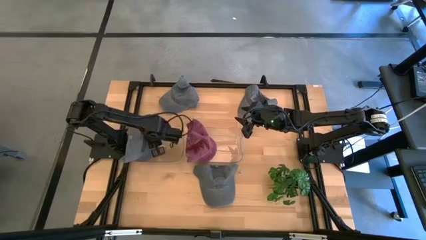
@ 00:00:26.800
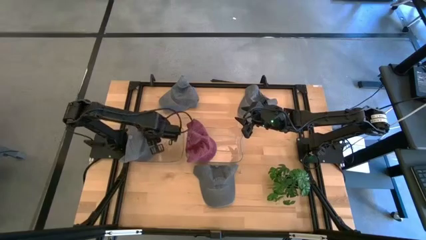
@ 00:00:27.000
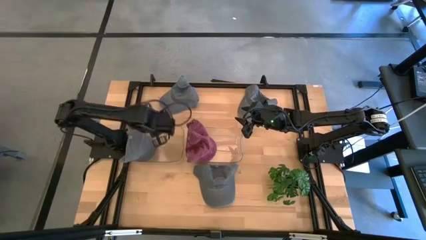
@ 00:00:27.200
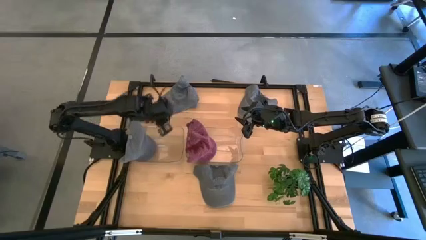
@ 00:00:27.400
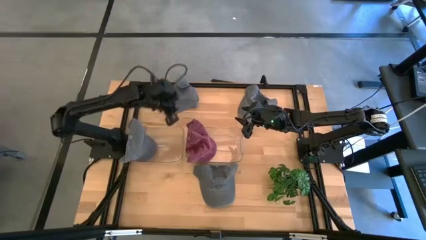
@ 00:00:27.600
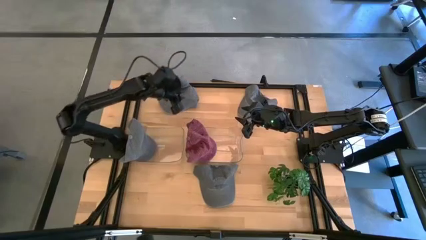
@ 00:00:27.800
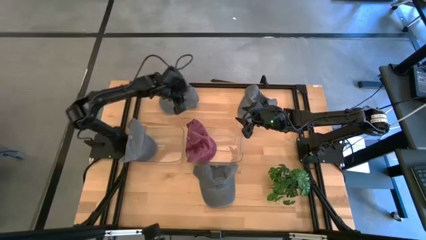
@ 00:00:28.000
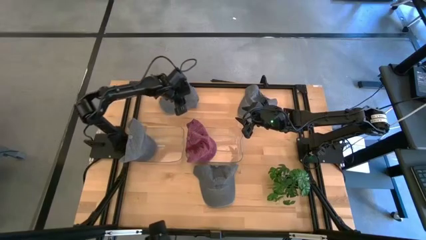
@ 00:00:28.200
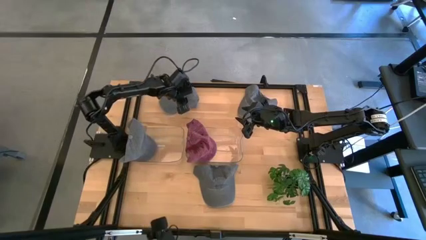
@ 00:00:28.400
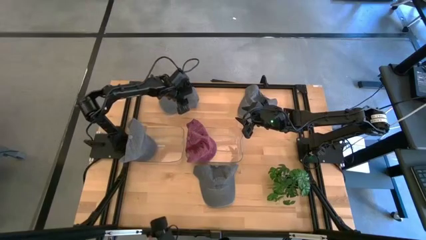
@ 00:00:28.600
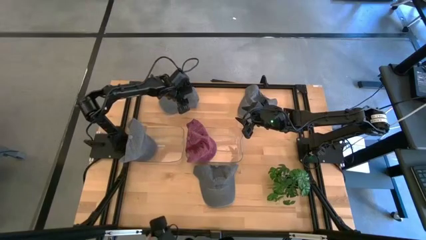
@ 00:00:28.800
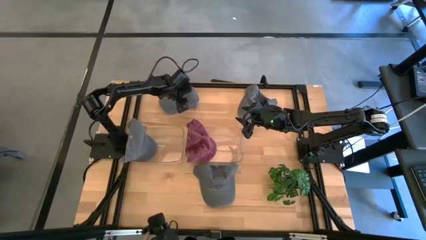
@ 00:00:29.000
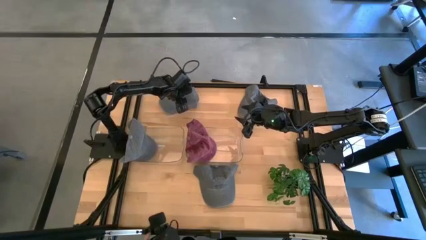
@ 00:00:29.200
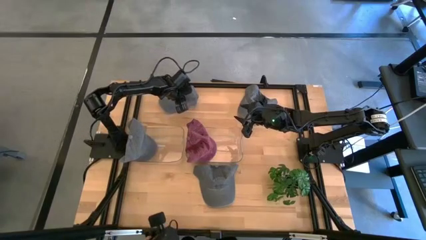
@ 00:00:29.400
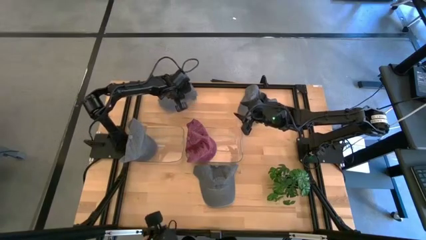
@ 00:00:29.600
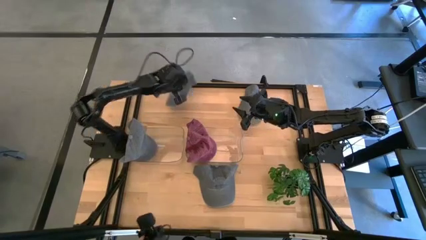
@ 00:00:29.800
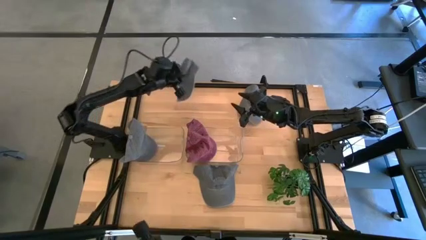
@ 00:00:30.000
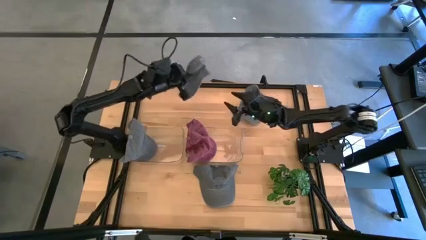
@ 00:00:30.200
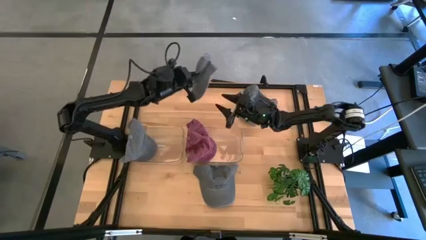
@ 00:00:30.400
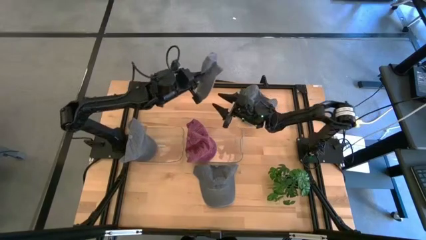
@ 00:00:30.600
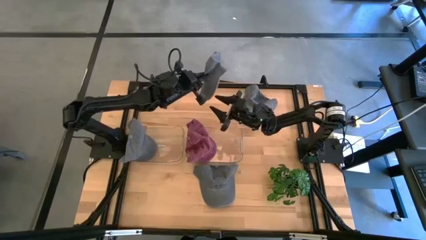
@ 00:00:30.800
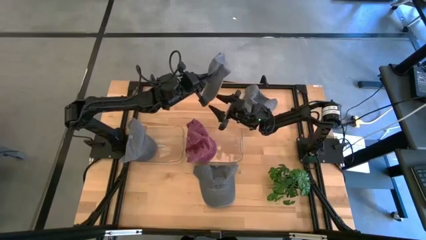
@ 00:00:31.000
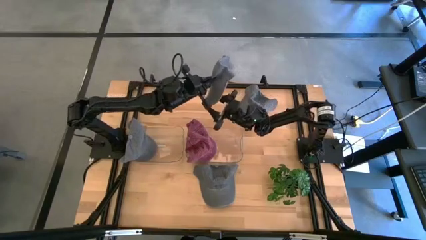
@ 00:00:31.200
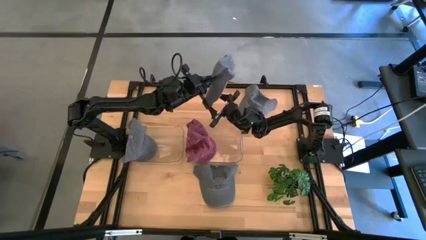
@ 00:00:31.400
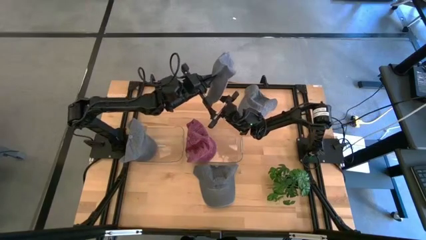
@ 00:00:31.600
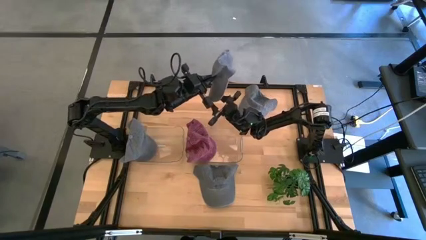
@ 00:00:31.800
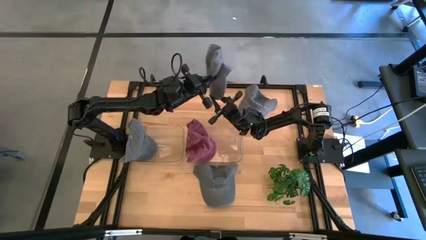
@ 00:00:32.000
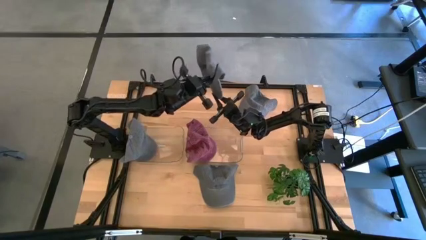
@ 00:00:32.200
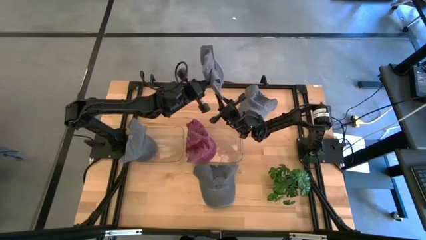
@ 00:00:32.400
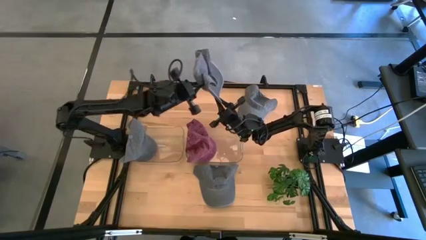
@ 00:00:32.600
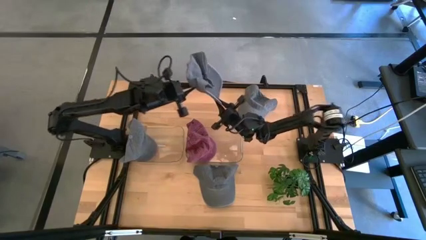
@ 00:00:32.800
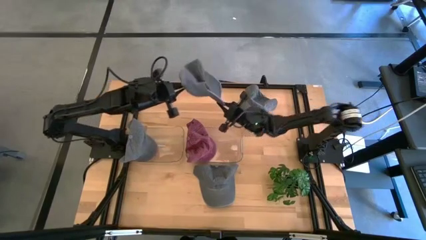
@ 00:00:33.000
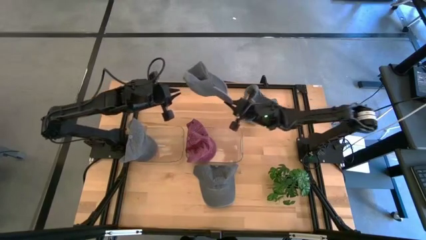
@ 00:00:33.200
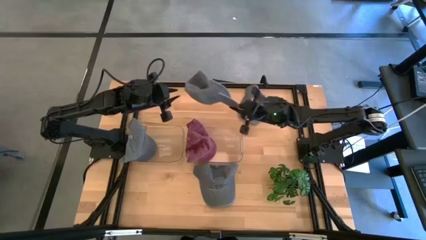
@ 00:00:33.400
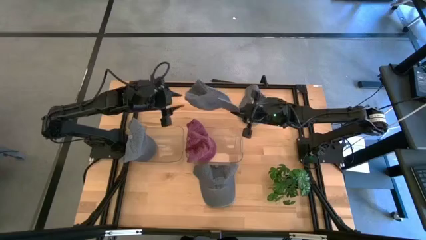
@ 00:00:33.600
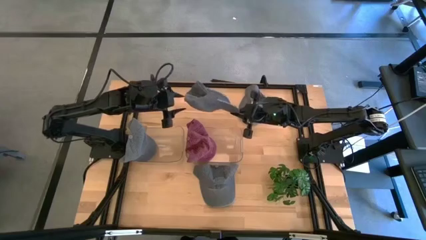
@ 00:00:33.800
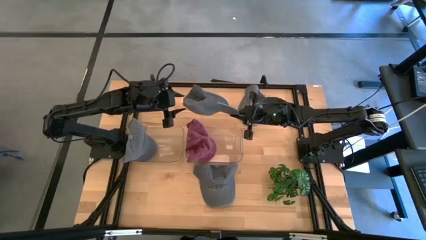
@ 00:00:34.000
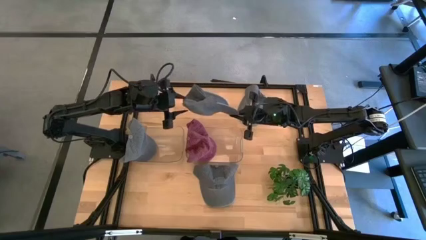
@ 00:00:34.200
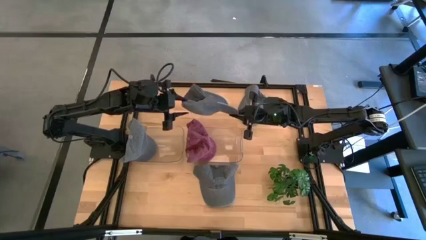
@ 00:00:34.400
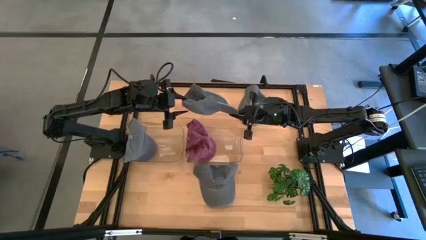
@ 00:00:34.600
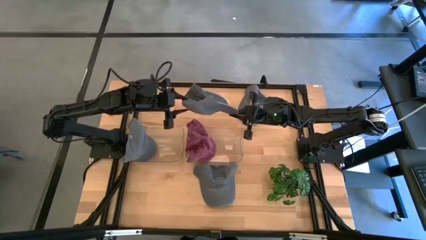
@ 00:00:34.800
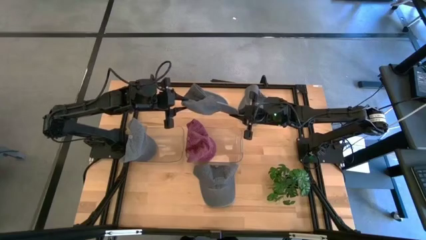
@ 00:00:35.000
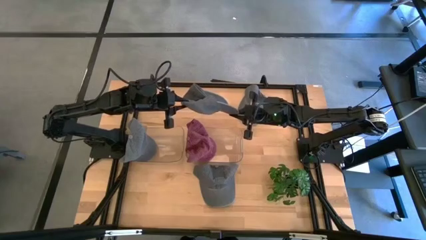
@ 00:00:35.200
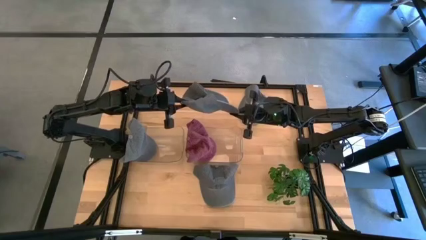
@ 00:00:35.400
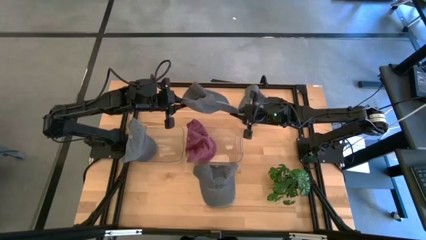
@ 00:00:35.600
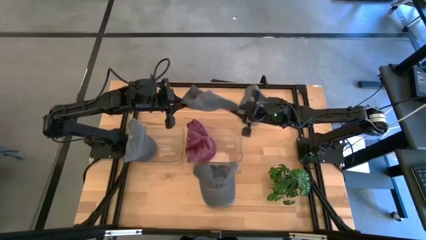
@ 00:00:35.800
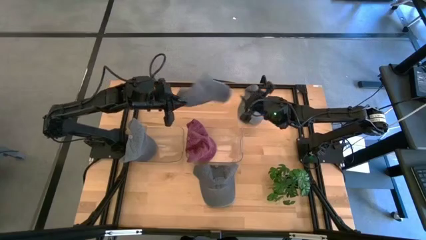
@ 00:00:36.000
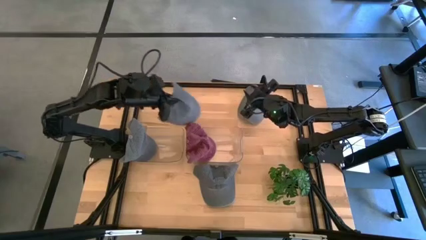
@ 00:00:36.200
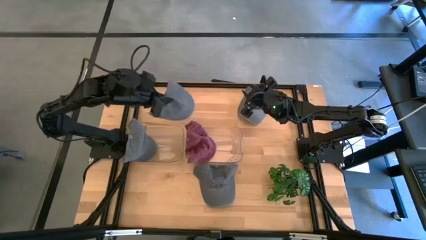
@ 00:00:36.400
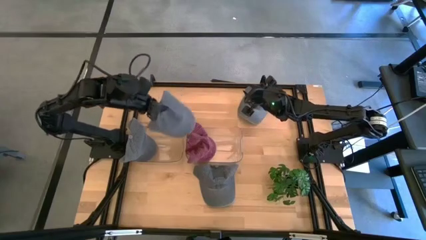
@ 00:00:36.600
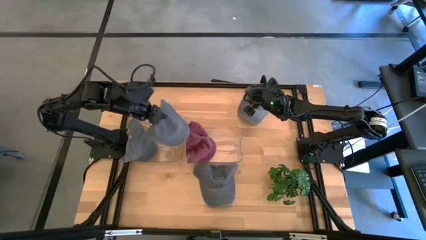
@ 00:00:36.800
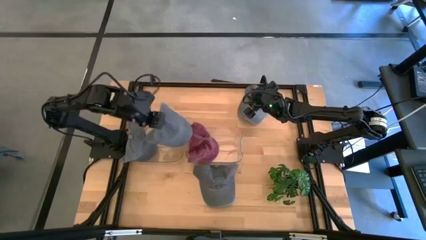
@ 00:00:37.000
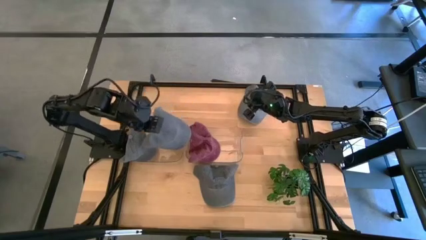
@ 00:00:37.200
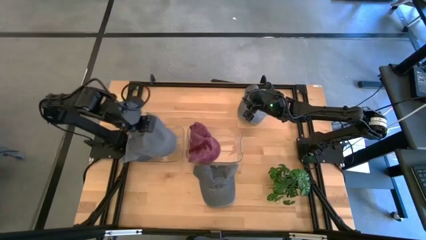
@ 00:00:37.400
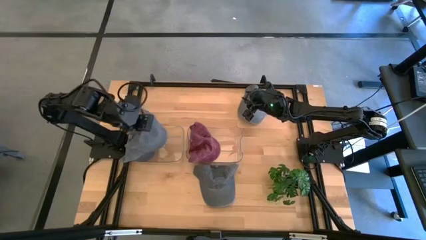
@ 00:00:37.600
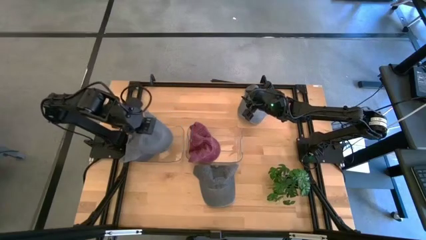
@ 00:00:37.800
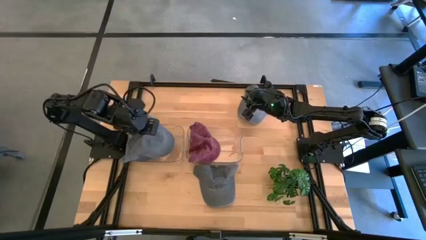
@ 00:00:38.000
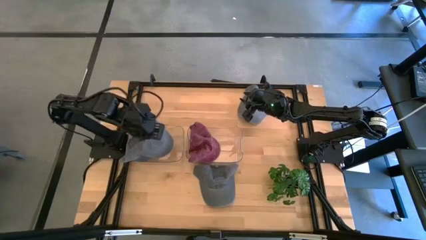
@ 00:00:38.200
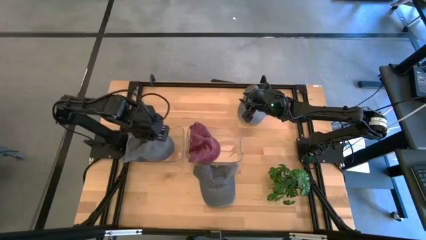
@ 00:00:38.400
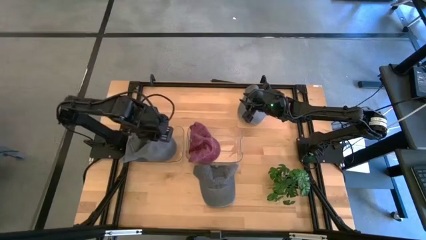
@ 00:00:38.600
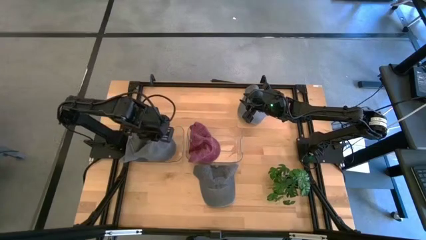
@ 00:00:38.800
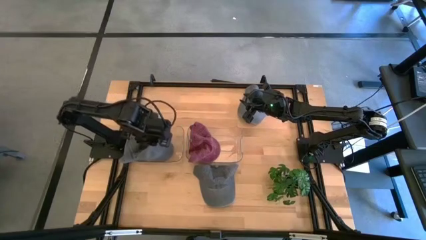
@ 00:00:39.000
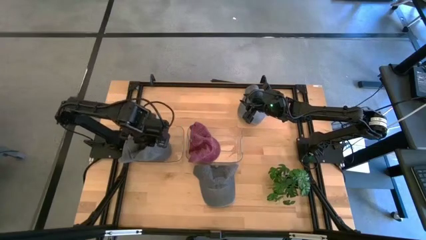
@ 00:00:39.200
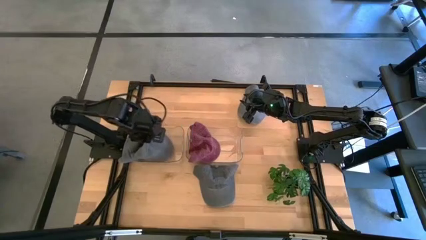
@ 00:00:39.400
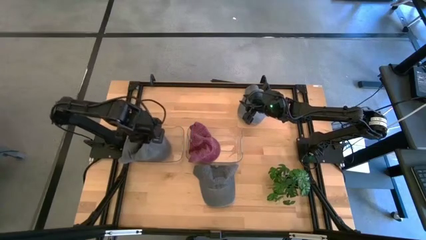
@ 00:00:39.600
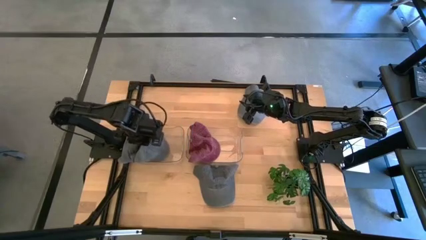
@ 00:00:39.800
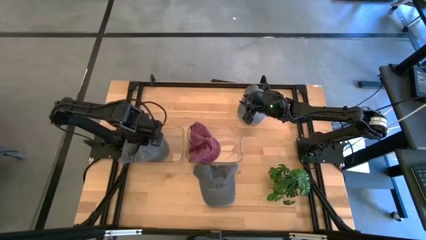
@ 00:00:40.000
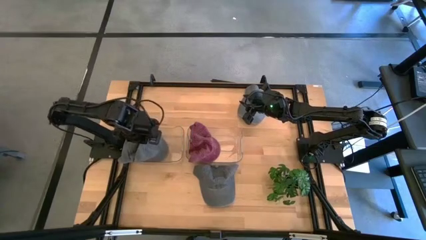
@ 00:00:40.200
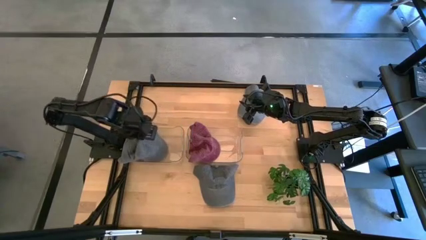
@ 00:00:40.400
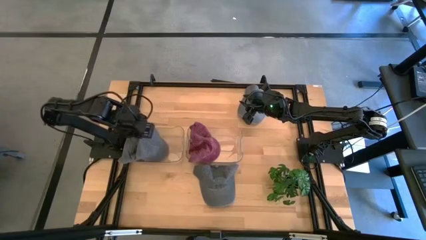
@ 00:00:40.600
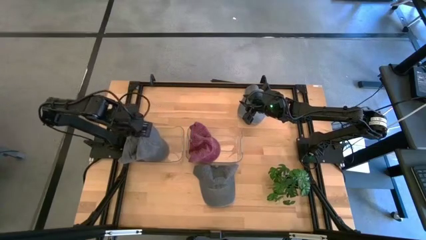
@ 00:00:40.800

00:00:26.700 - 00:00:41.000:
Task: Pick & Place hat
Put the top left dark blue cap into the left transparent bin
